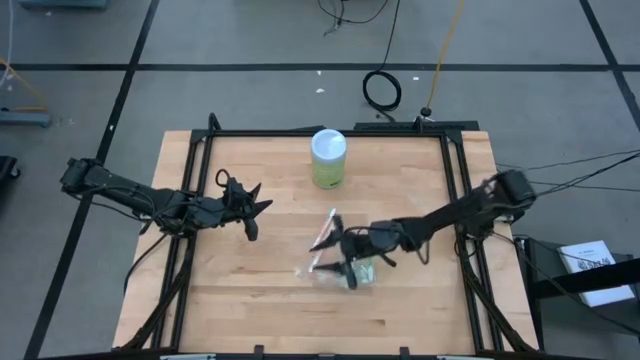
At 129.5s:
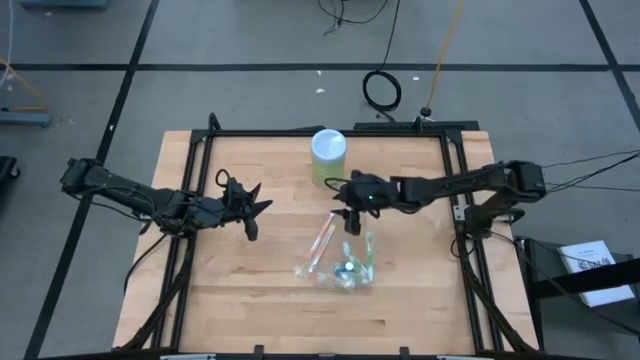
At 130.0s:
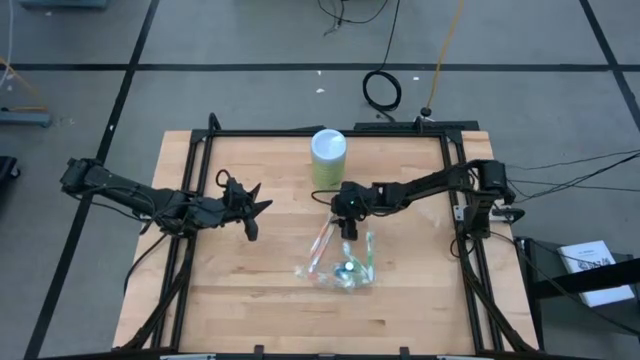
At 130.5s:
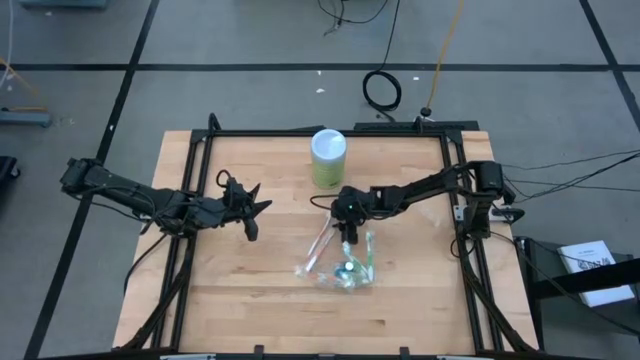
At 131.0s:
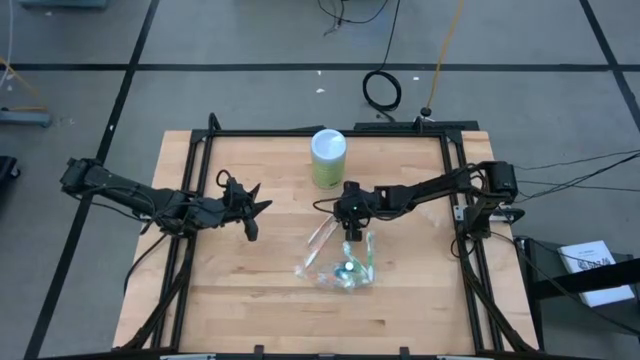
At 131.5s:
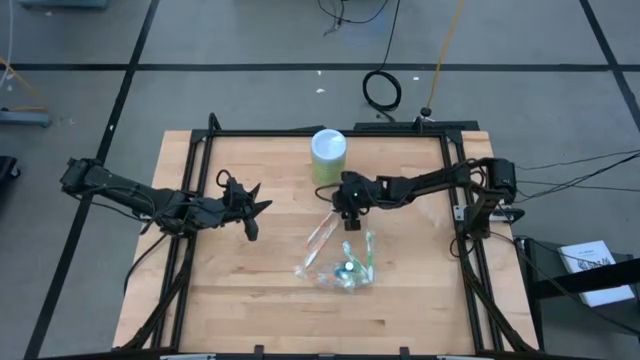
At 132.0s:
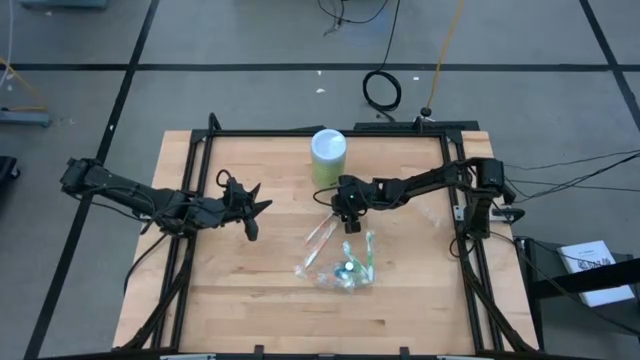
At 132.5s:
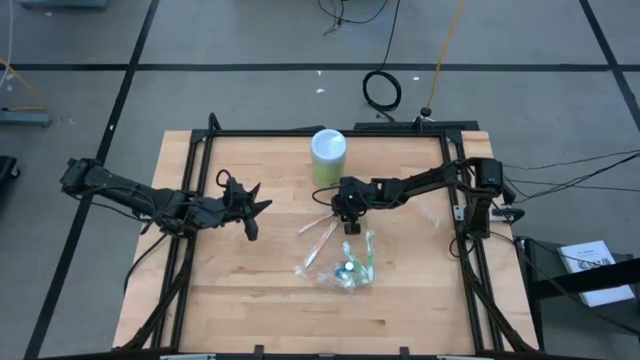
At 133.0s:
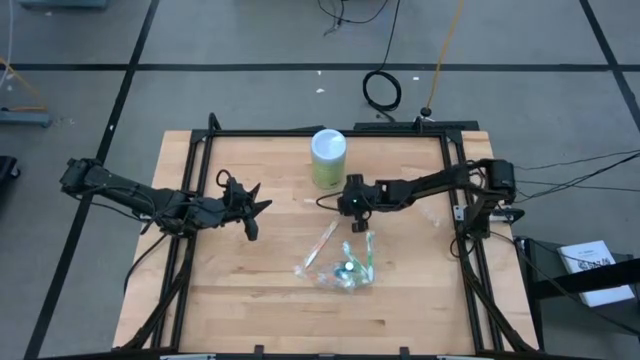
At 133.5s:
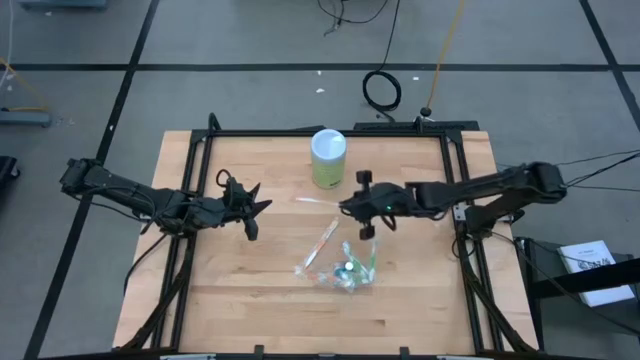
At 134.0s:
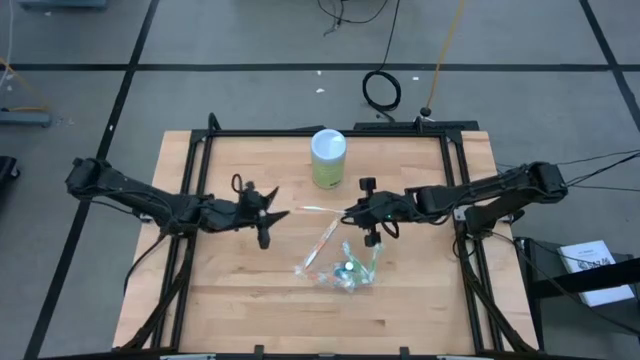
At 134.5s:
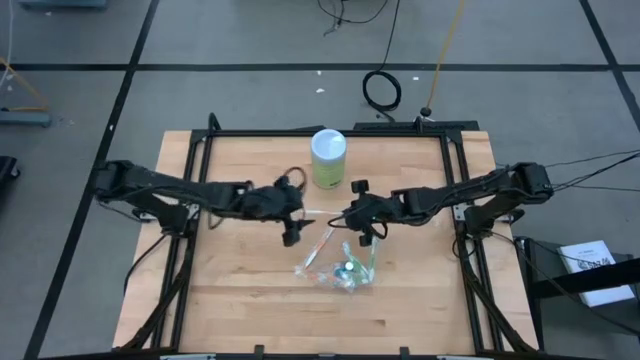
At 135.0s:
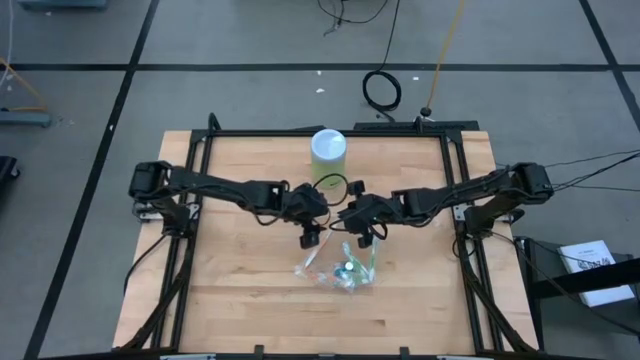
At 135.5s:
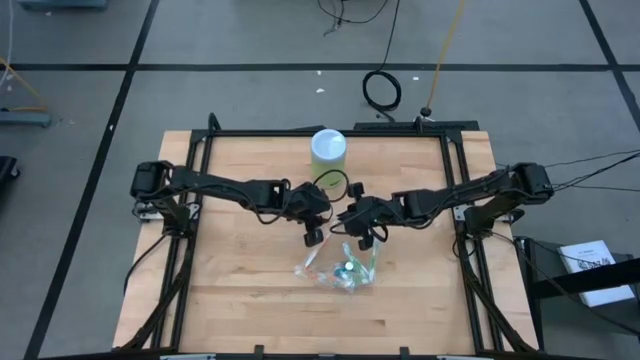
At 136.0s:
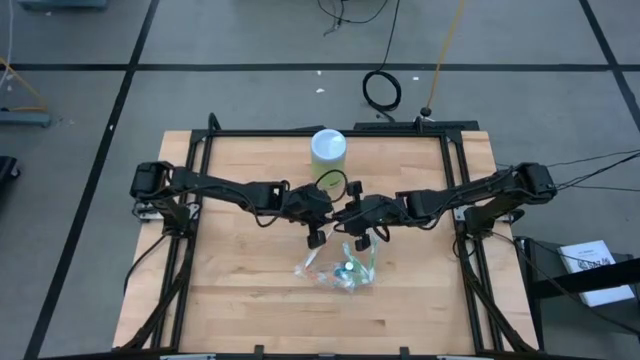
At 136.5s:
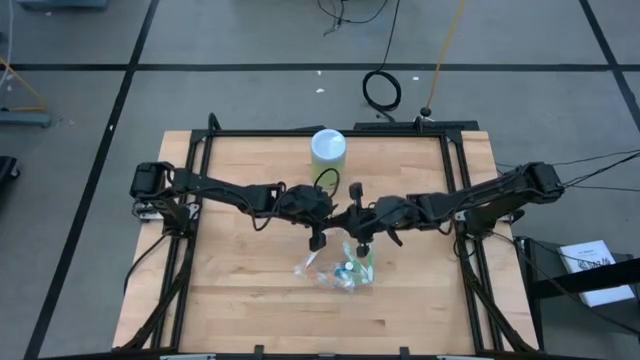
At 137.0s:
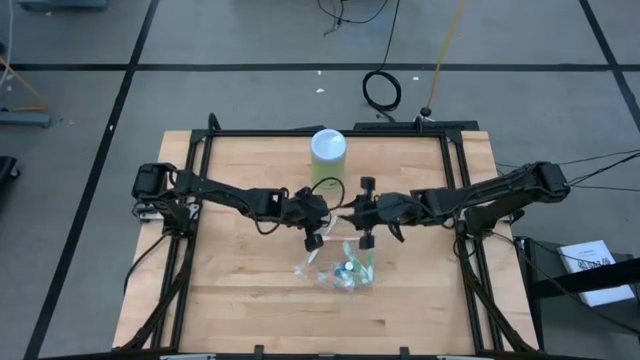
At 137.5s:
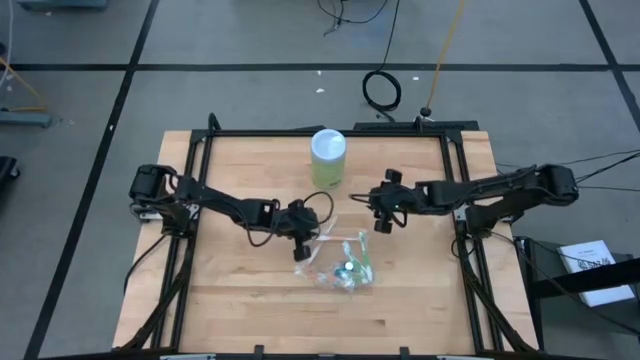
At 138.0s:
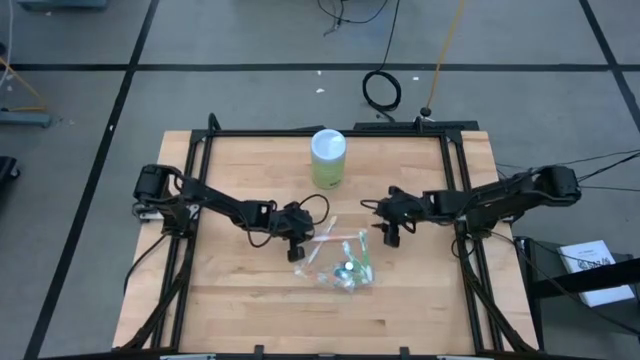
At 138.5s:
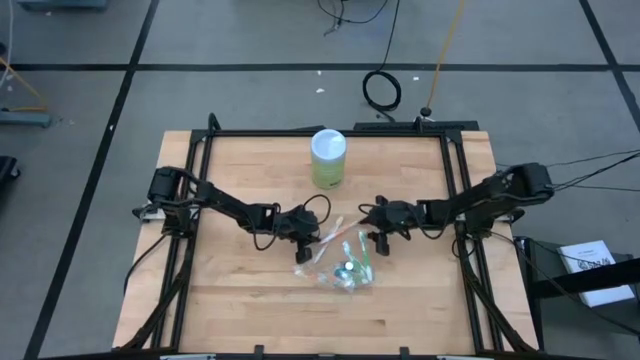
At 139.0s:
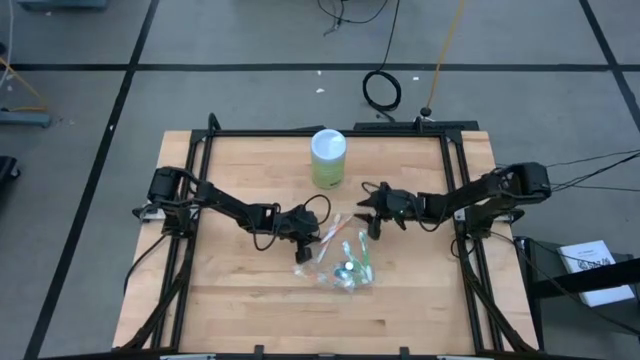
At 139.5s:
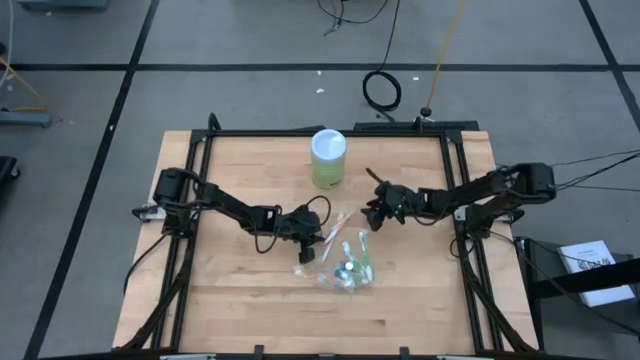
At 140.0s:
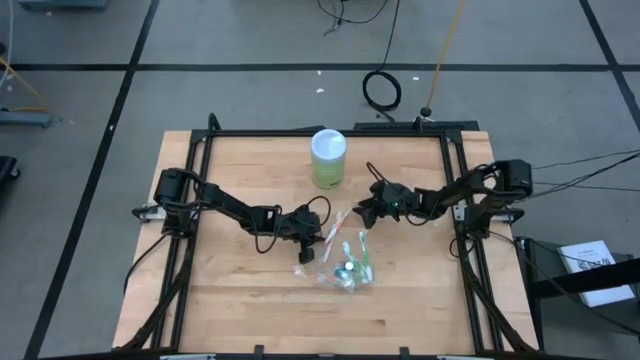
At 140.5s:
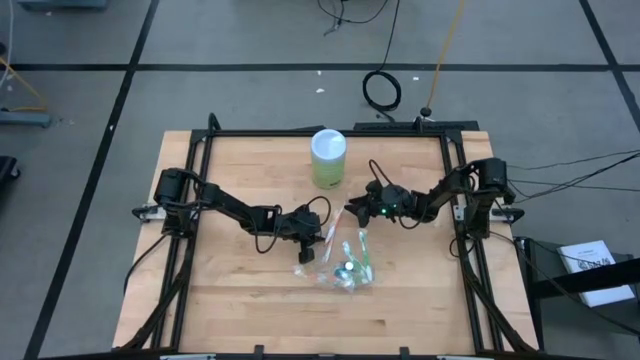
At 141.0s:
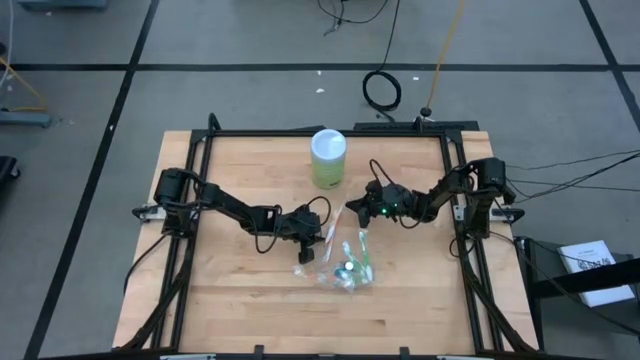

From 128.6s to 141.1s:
Task: Pick & Place toothbrushing station
Put the orange toothbrush into the left section of the transparent organizer

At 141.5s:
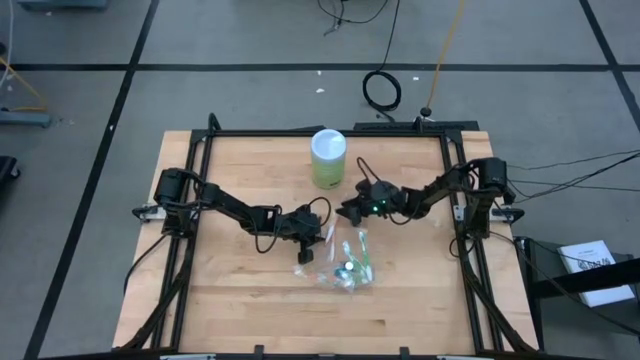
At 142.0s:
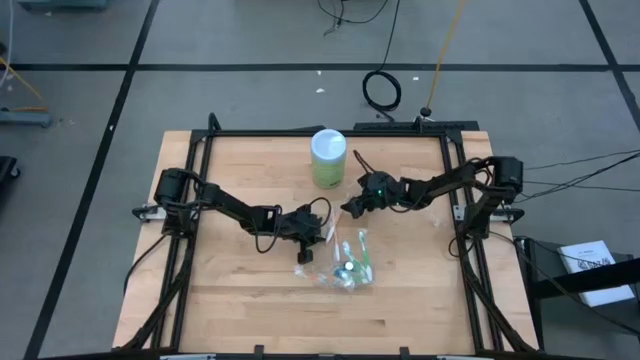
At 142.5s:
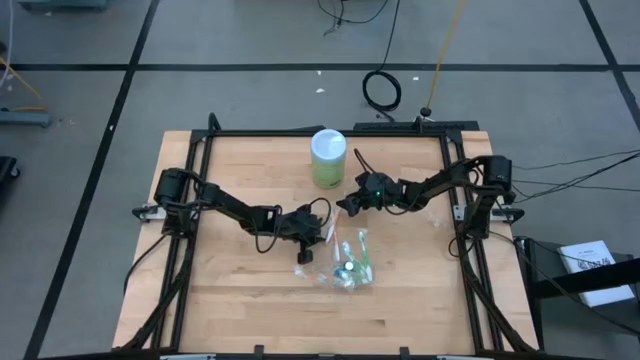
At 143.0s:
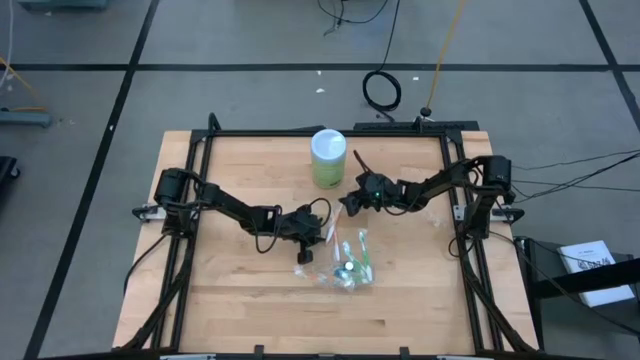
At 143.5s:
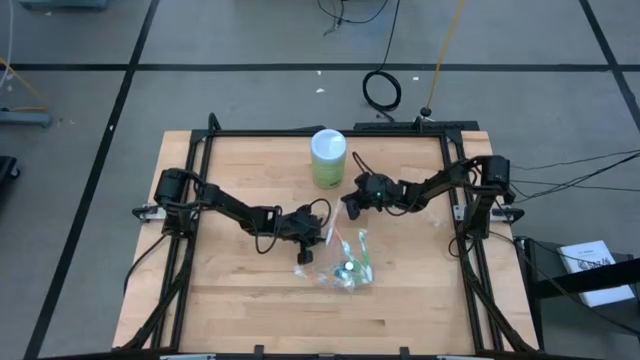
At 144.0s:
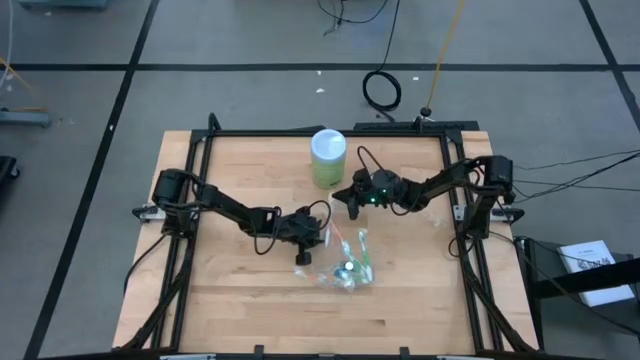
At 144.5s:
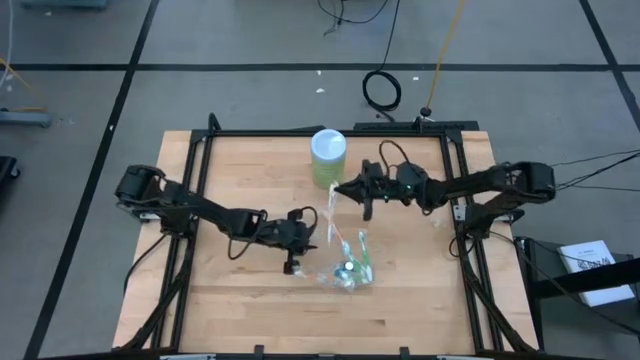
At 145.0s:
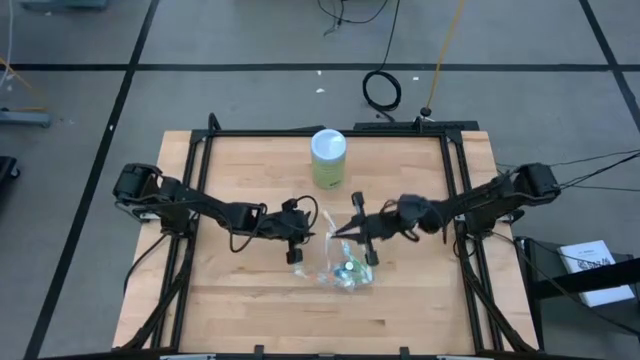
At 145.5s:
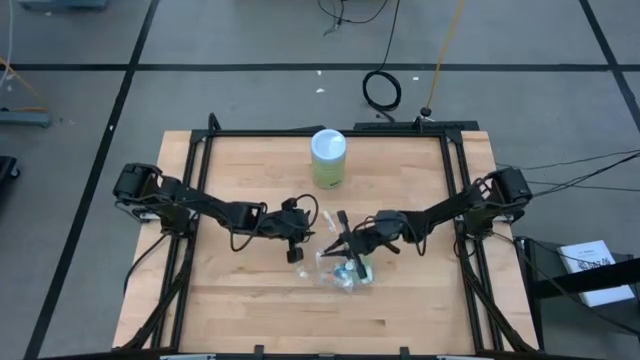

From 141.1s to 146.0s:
Put the orange toothbrush into the left section of the transparent organizer

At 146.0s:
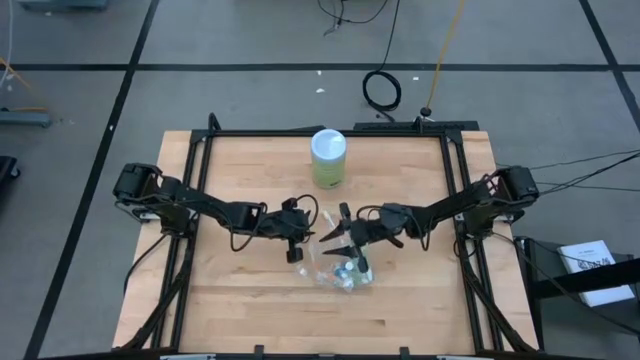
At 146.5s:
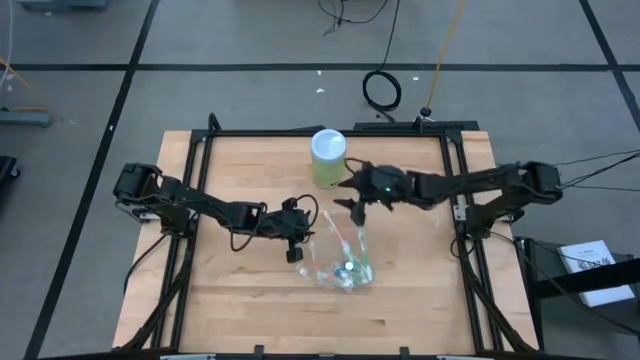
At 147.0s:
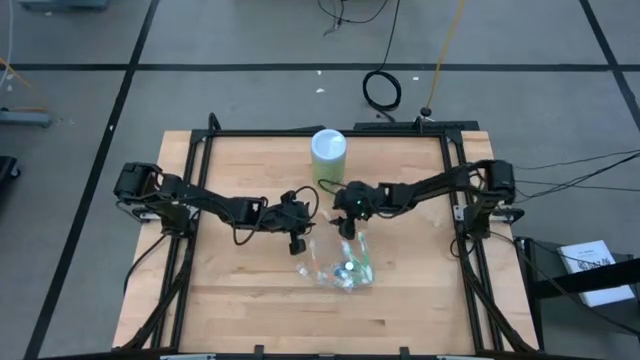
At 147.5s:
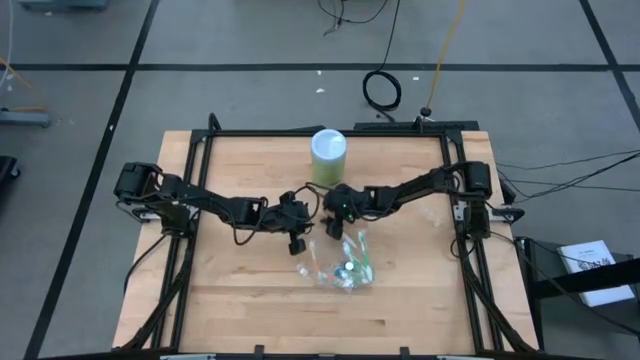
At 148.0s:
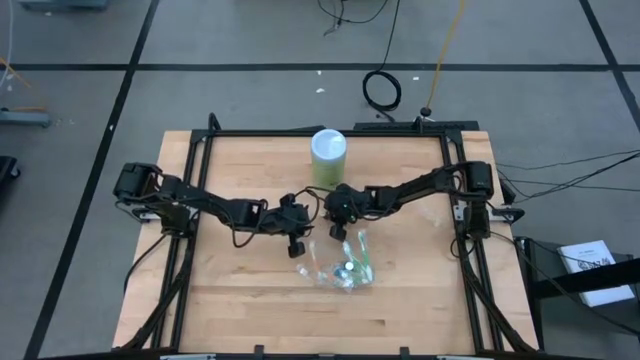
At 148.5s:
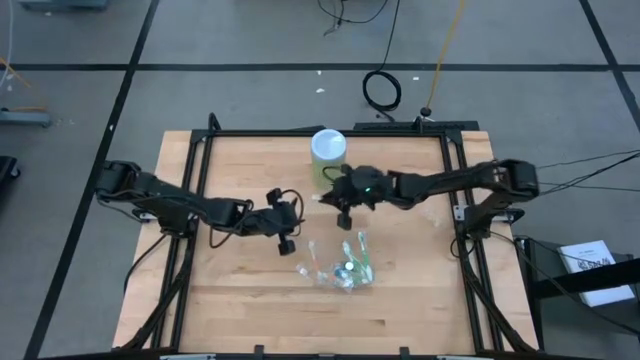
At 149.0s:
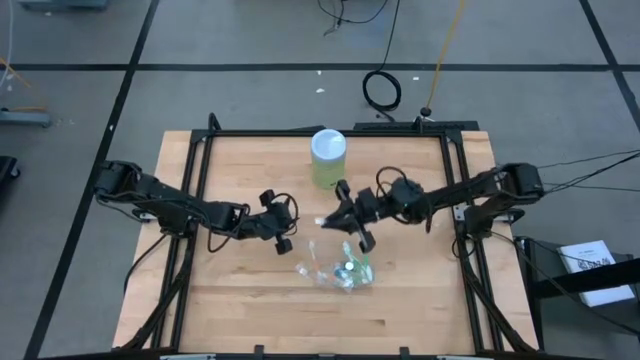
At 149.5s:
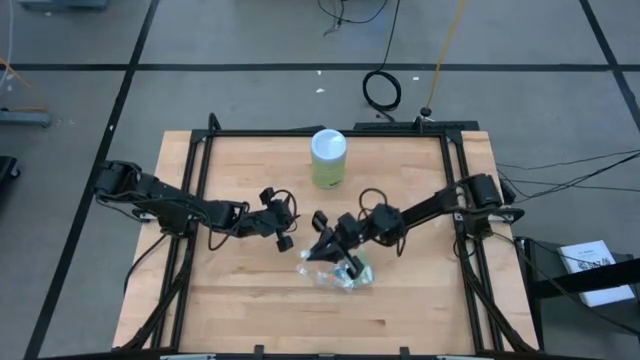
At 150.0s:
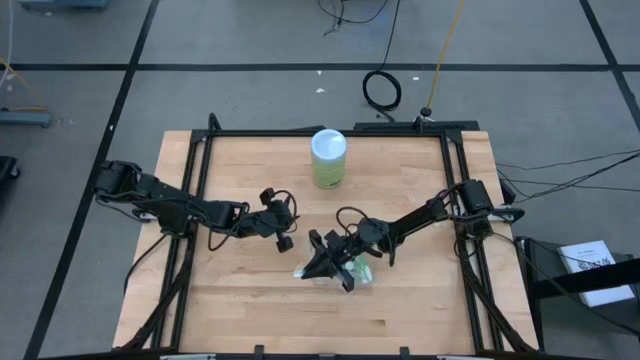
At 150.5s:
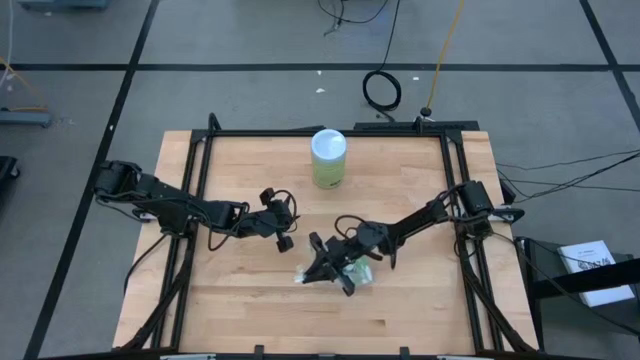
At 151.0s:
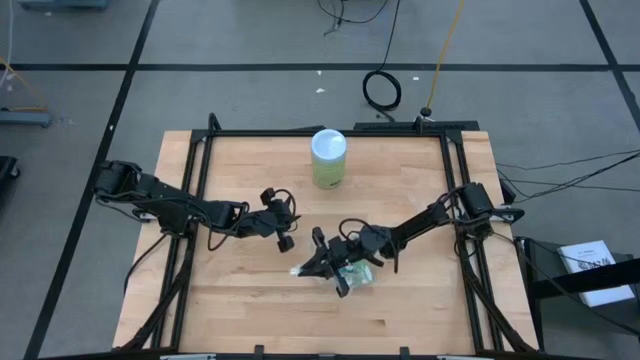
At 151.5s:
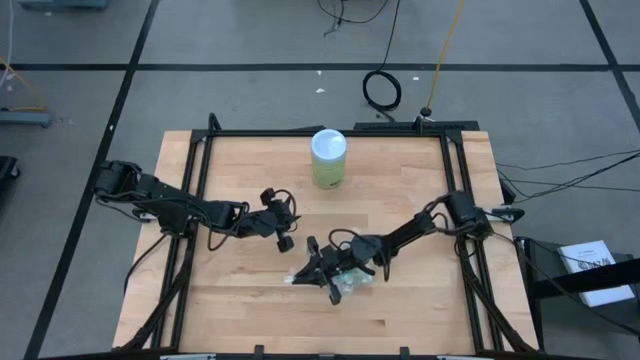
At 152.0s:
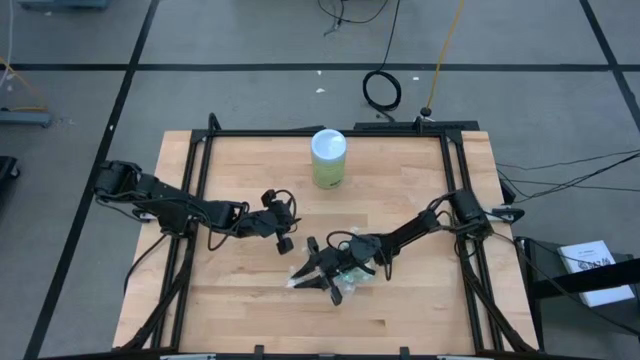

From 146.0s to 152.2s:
Put the orange toothbrush into the left section of the transparent organizer
